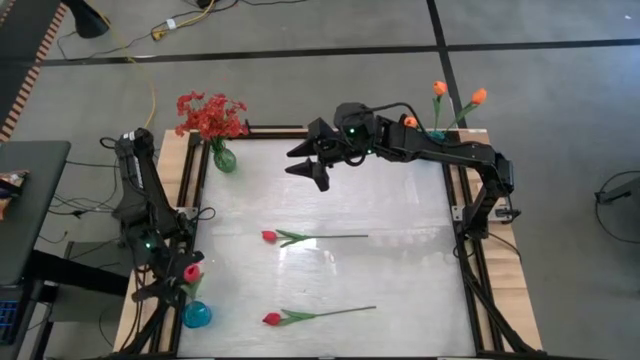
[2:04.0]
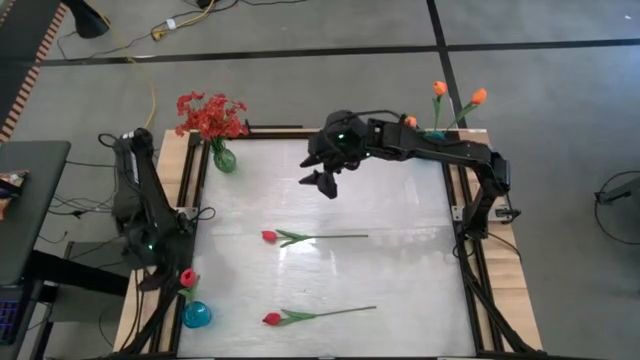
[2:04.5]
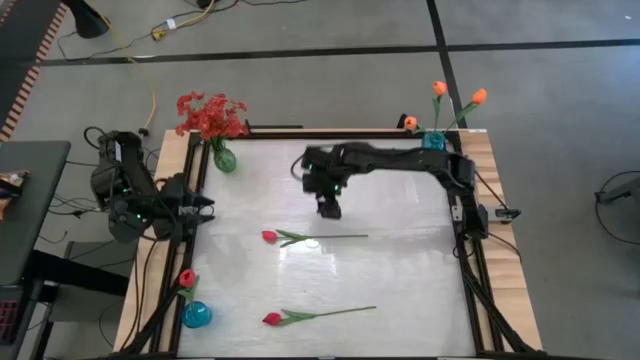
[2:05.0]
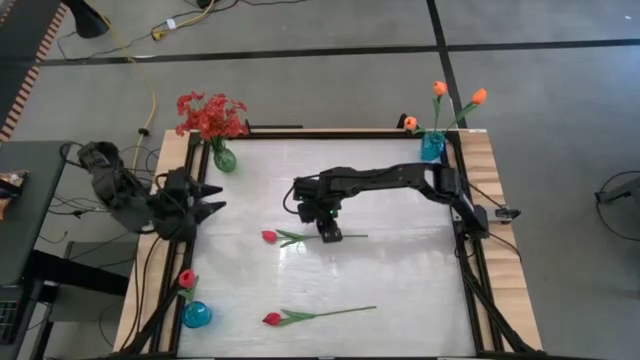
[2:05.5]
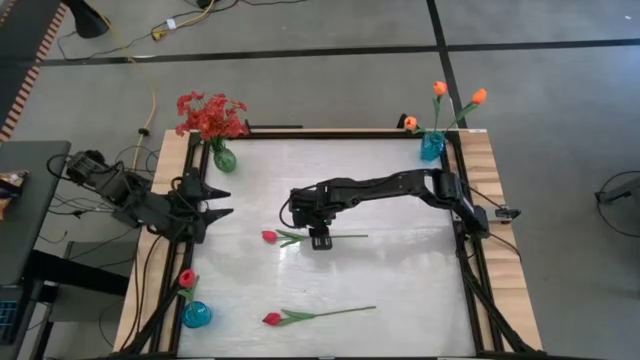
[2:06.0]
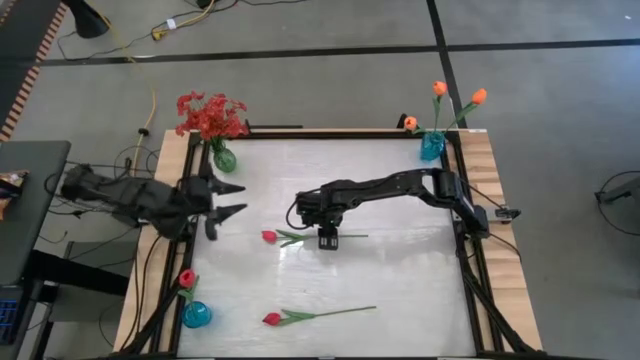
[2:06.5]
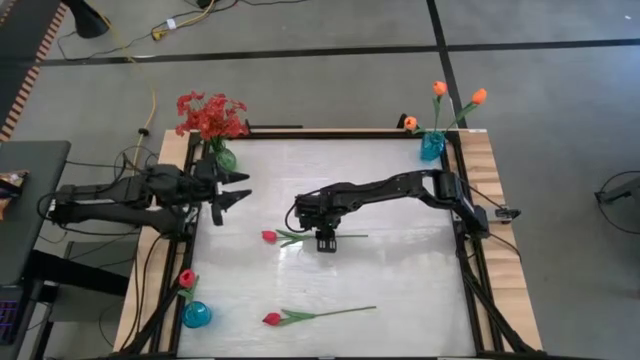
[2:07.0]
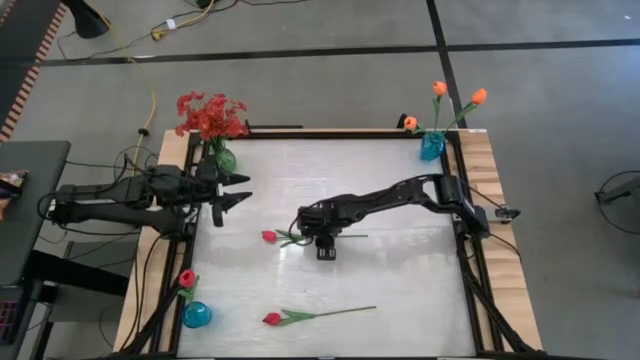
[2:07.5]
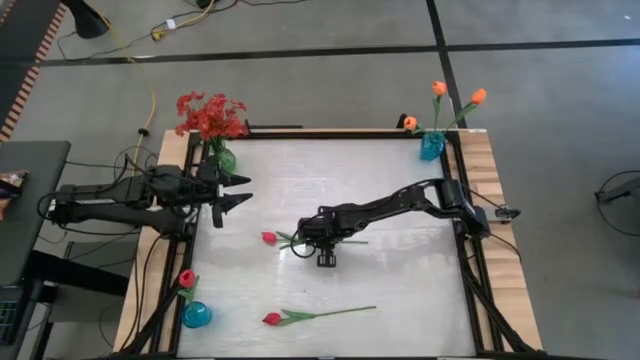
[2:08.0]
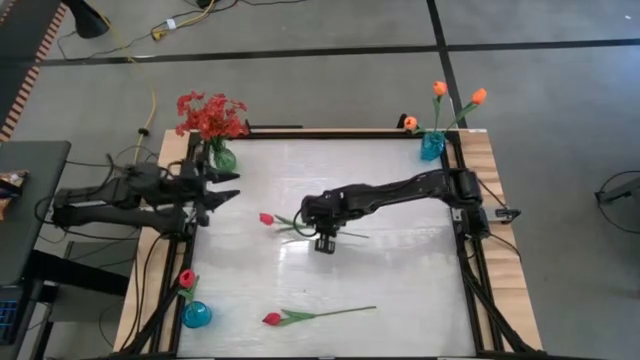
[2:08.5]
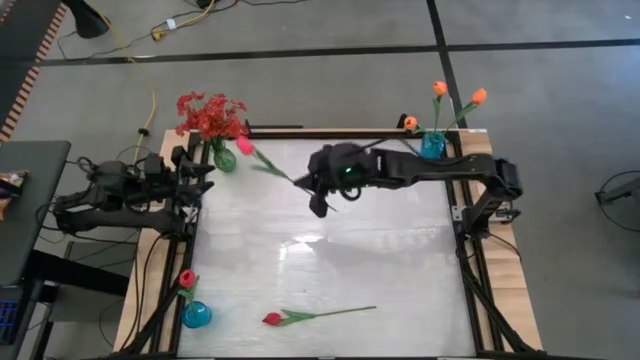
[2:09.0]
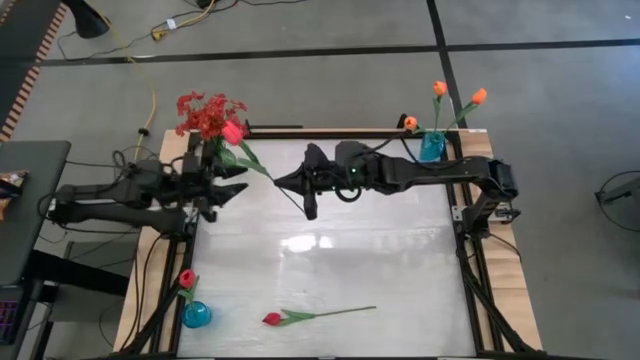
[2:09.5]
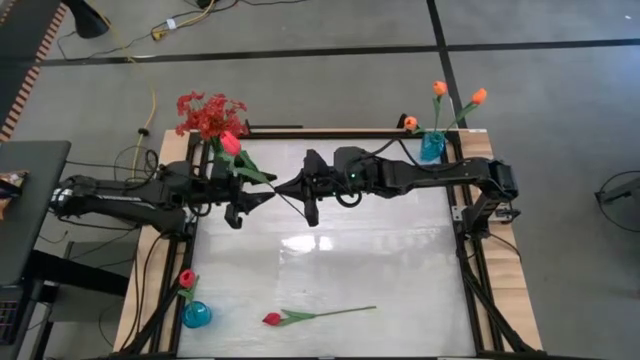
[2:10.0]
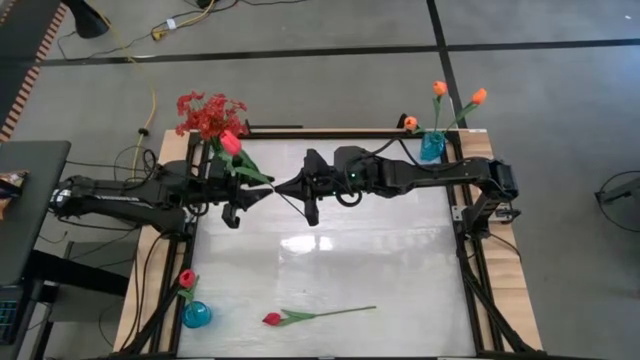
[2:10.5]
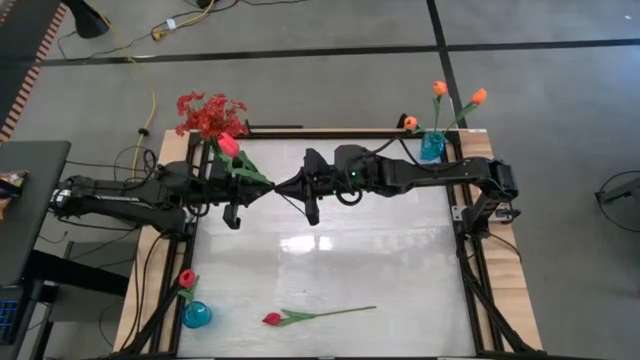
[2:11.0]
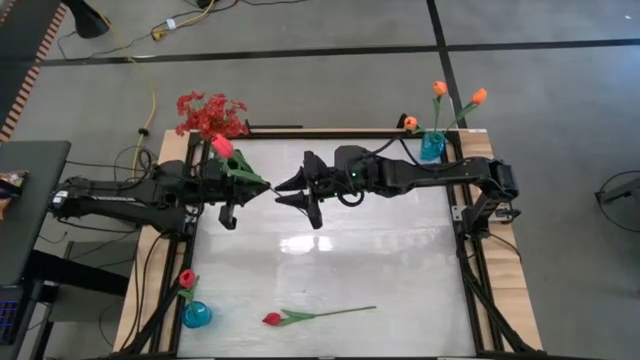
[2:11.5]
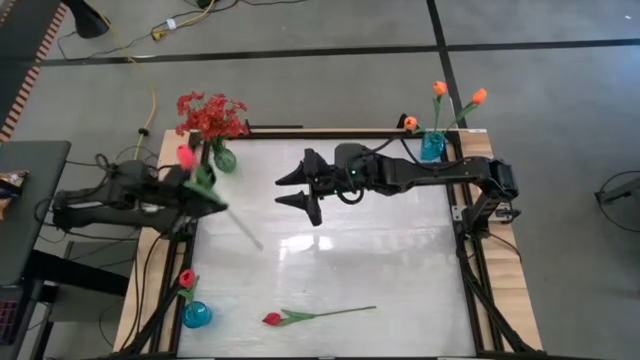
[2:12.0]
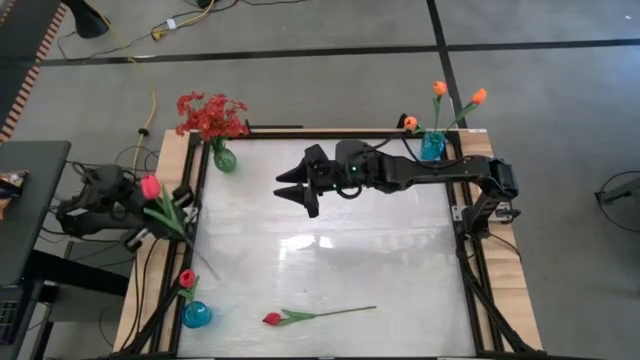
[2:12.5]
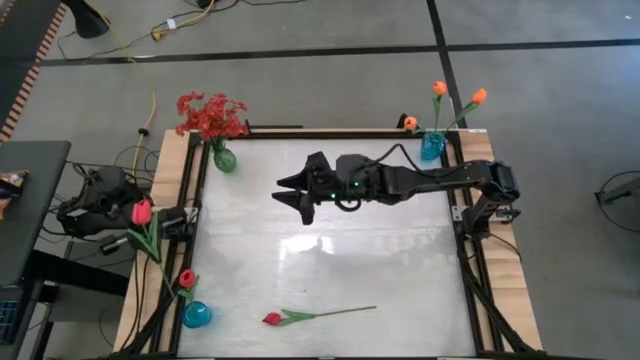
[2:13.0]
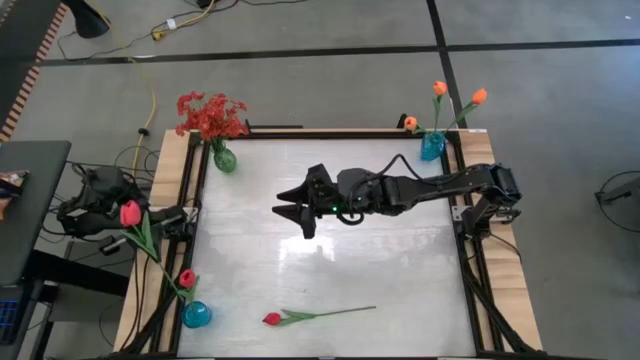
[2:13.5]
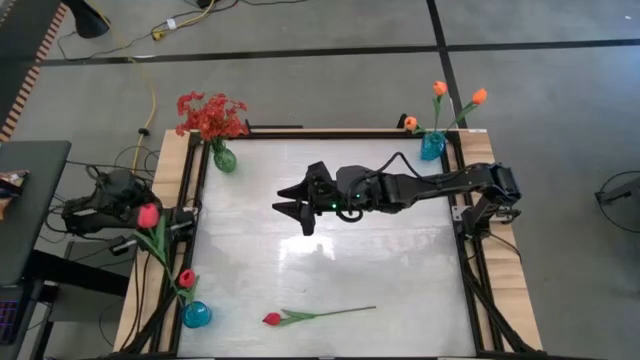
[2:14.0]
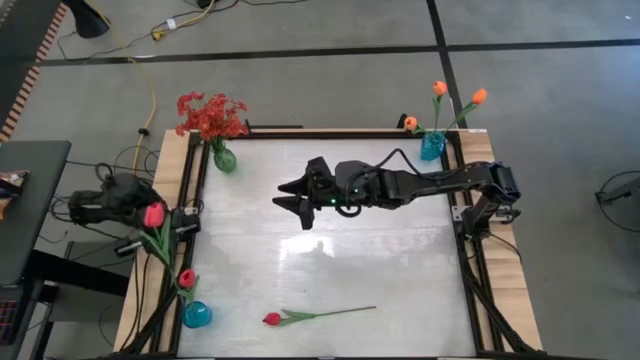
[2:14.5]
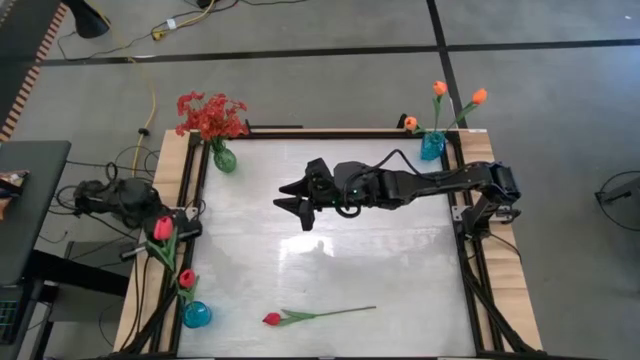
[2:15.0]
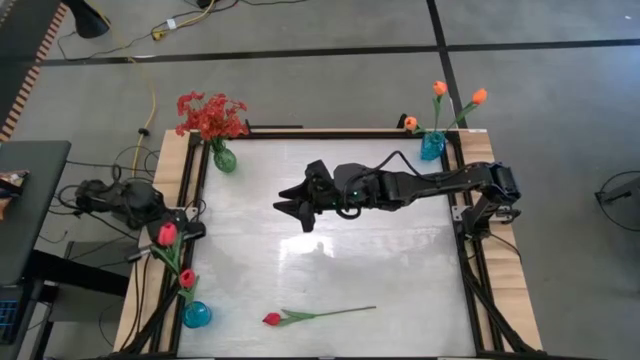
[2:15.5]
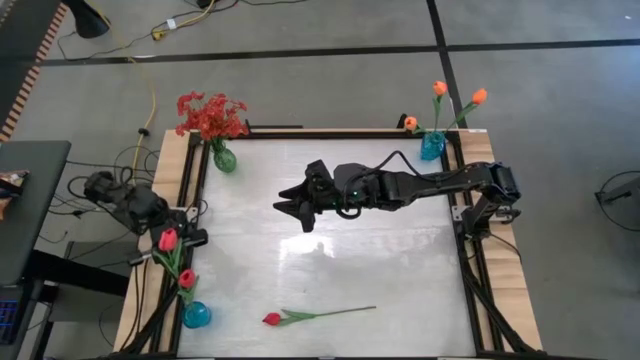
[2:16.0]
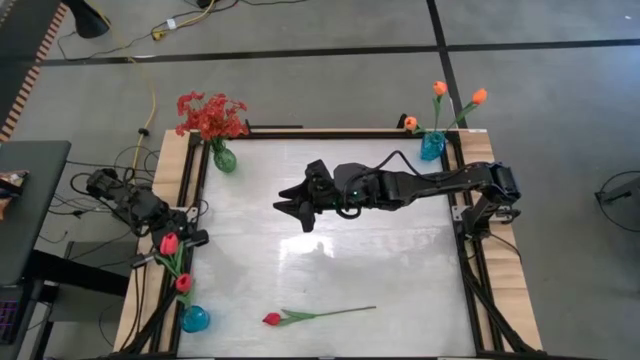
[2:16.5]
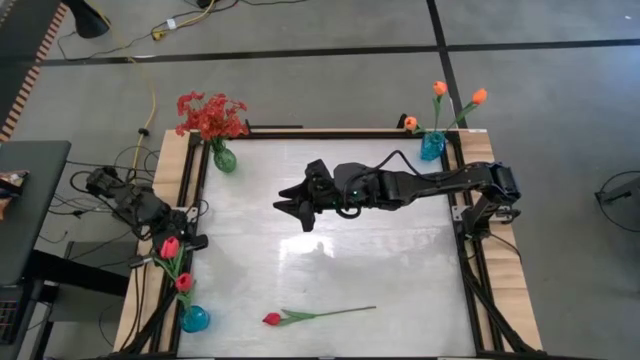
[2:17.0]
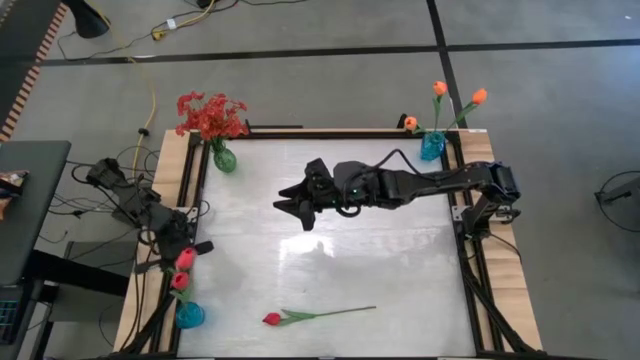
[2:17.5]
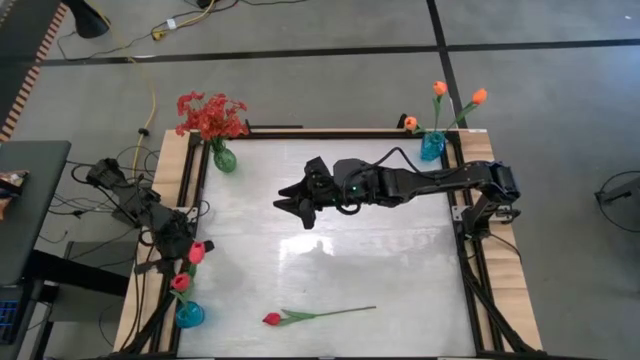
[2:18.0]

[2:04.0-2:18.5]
Task: Sort flowers into vase by color
Put the top pink tulip into the bottom blue vase

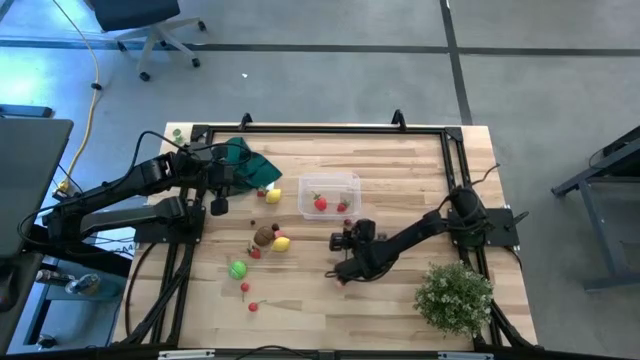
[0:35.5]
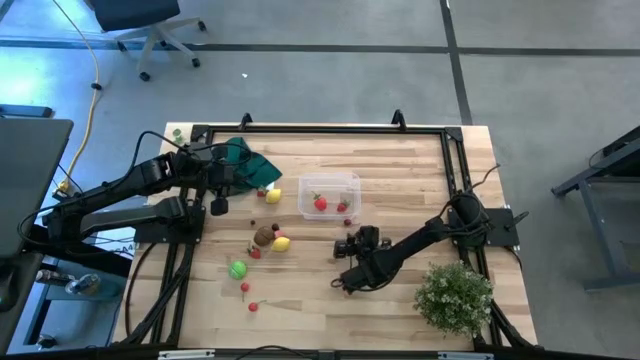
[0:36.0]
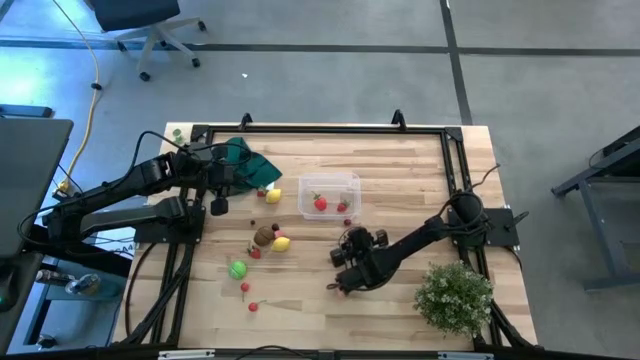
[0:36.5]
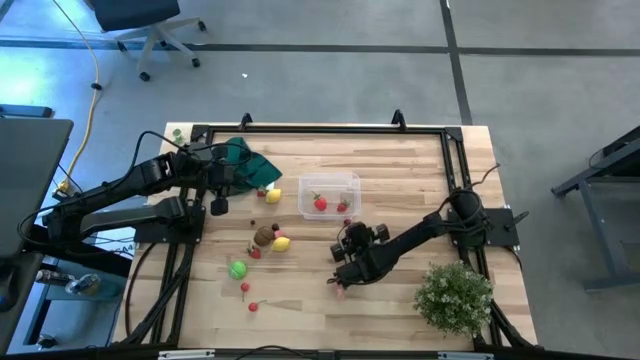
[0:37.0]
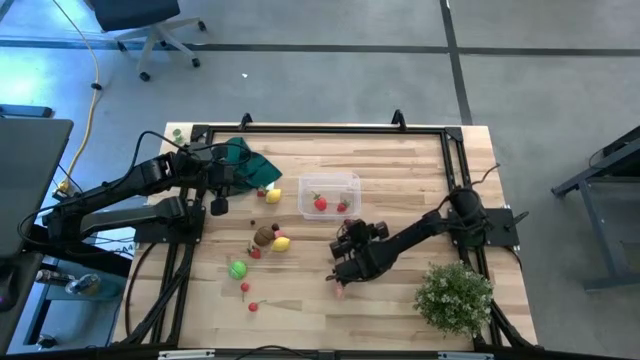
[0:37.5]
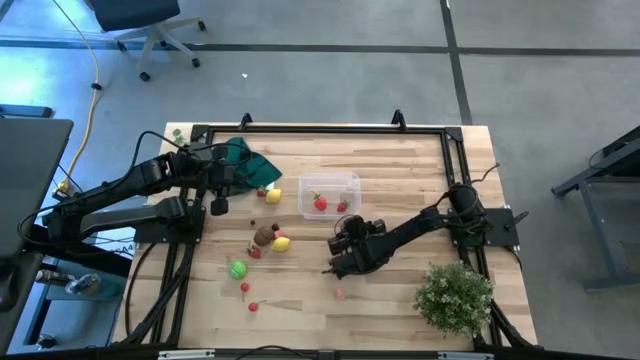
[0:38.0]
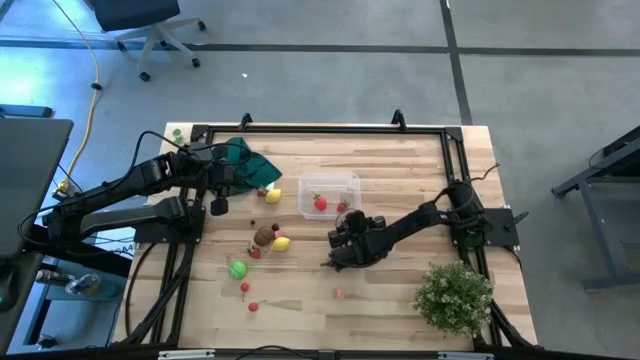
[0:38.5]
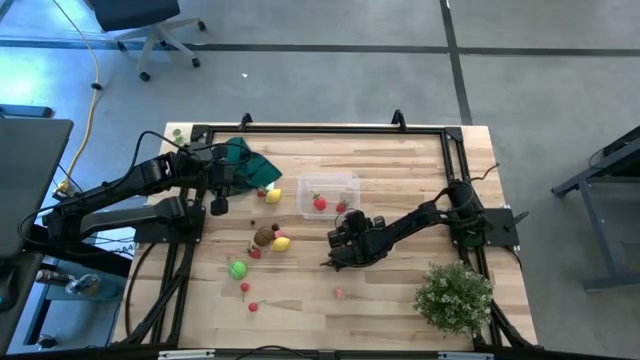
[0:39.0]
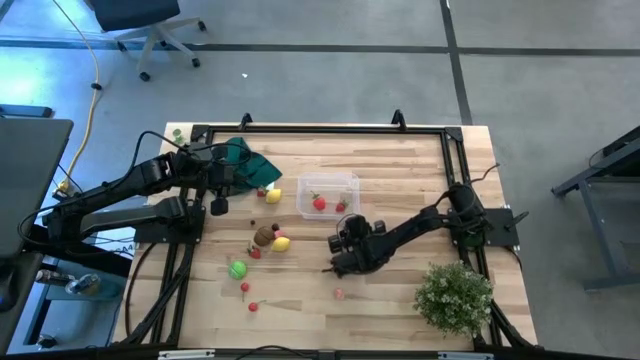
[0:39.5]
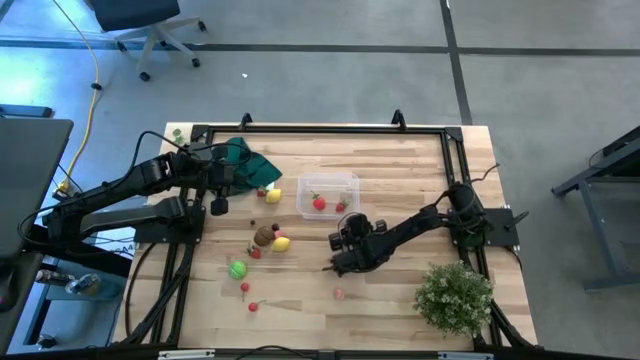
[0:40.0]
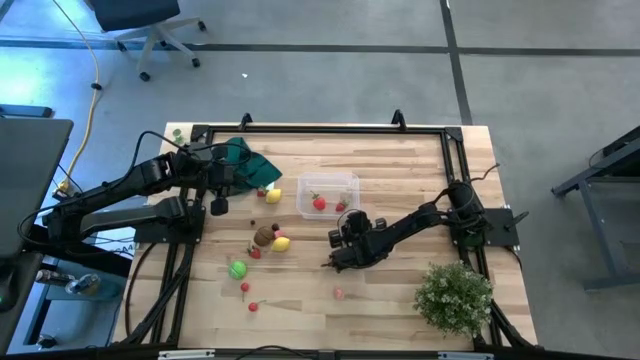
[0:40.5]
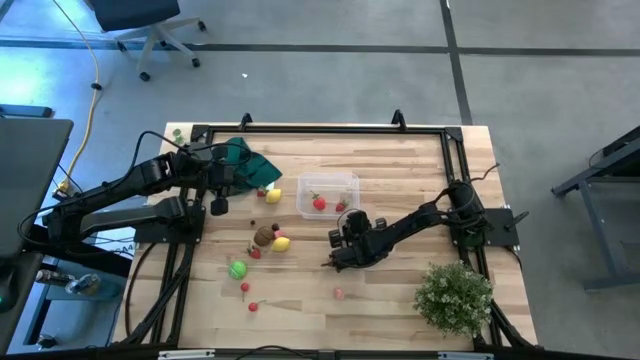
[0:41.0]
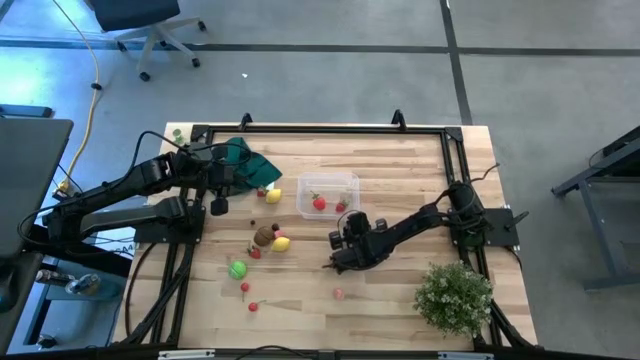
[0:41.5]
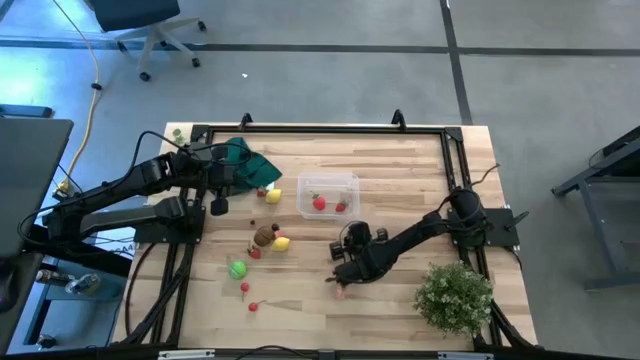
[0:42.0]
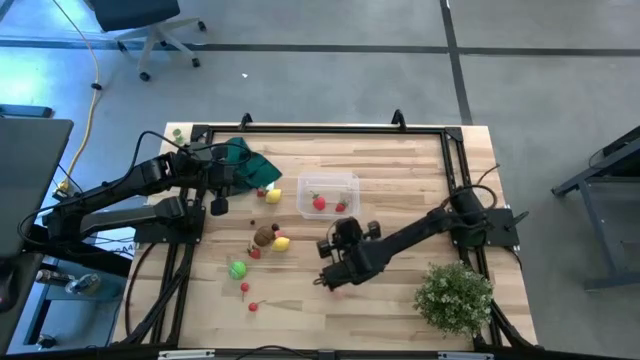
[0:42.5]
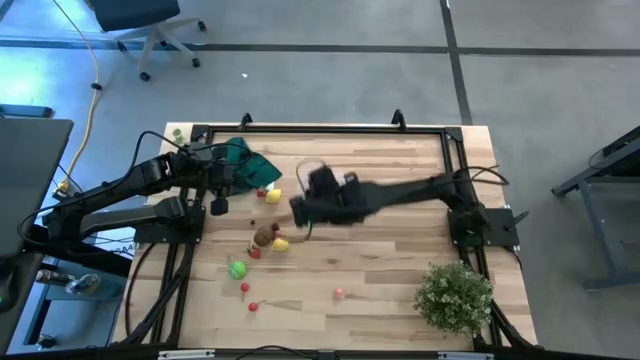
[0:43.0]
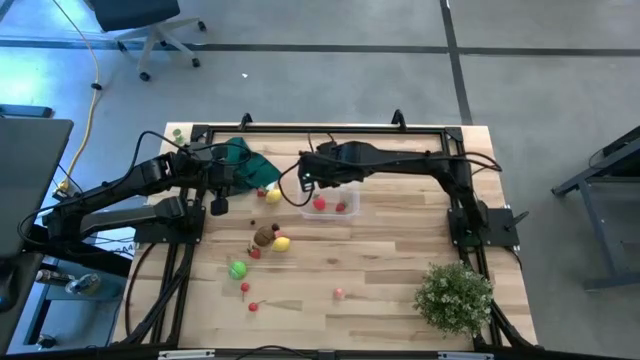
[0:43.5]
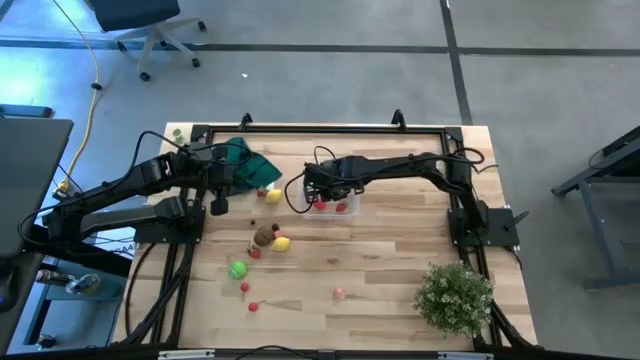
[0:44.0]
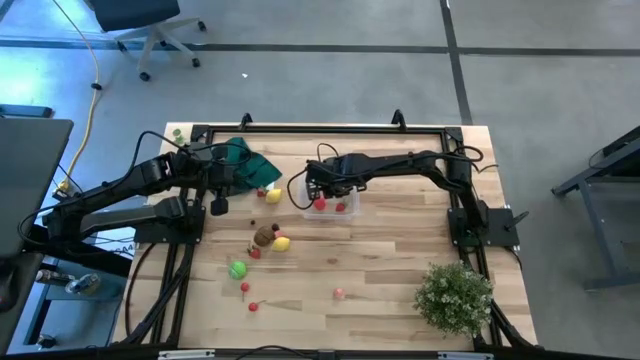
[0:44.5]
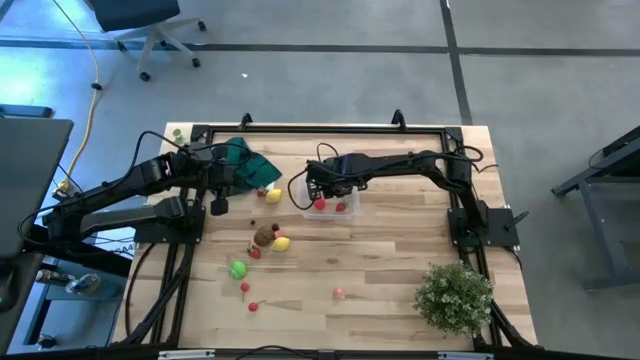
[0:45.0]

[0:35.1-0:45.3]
Task: Pick and placing Produce into tupperware
Put the top red cherry into the transparent bin
